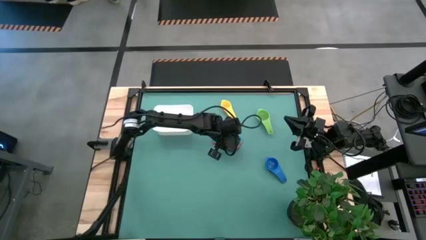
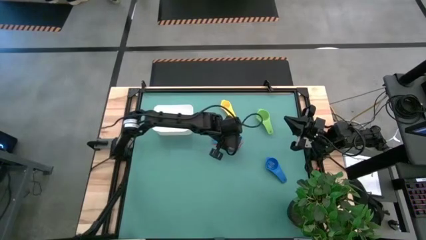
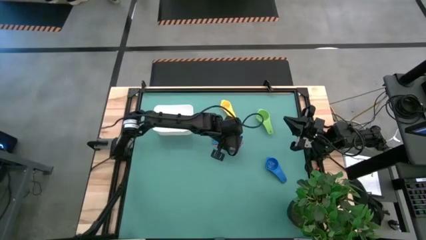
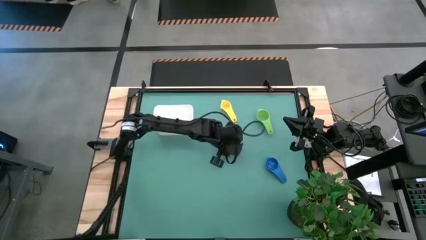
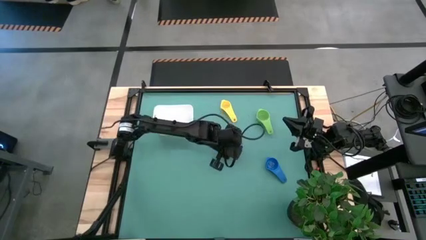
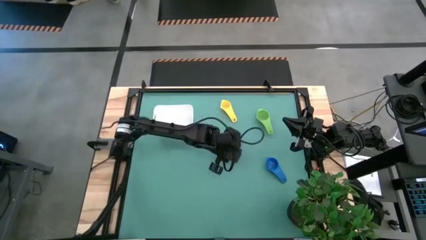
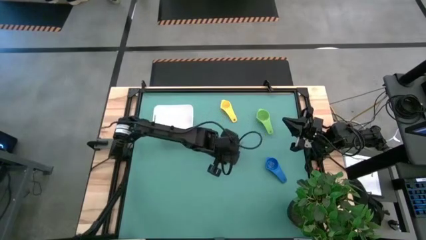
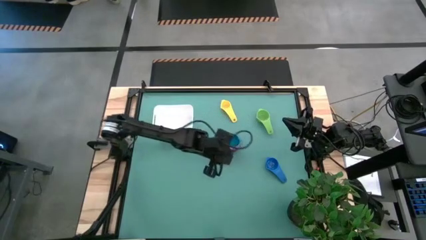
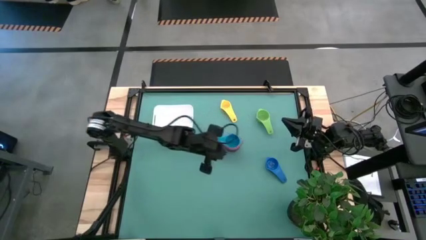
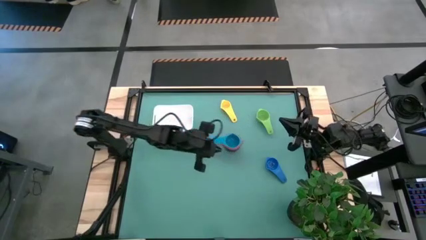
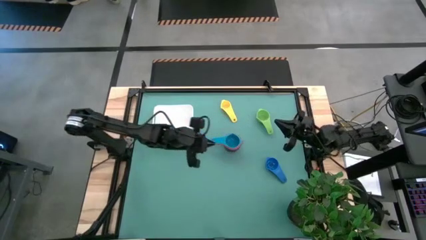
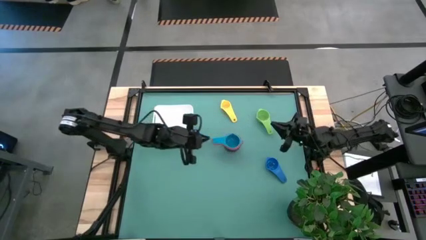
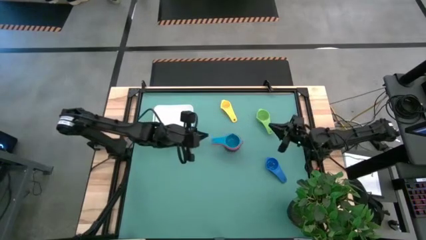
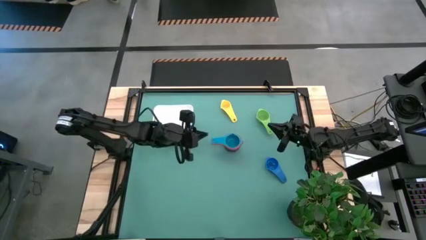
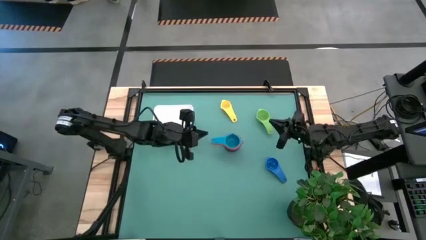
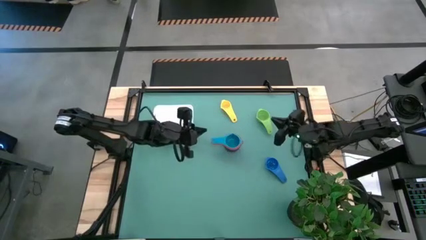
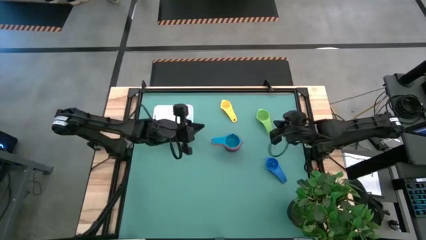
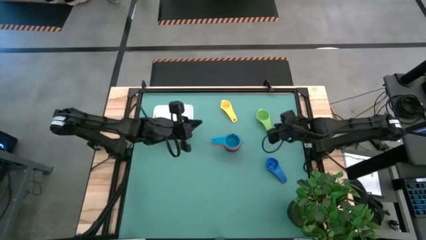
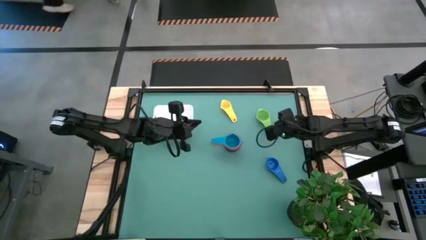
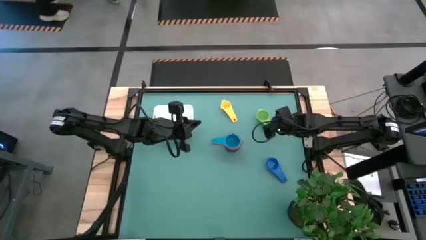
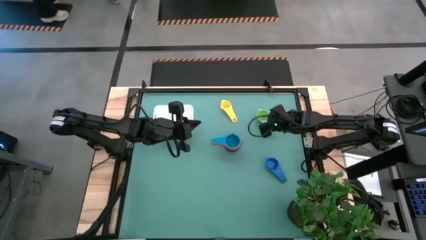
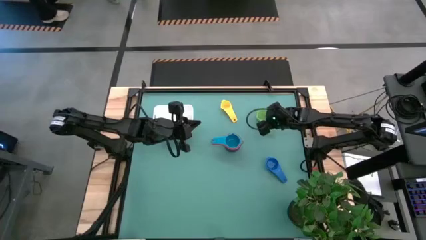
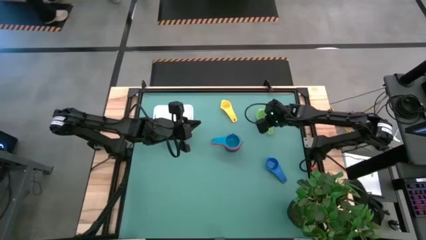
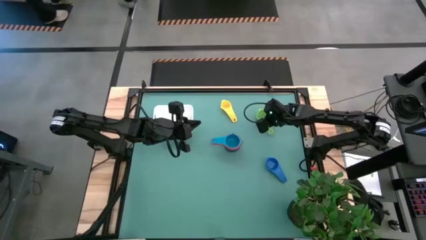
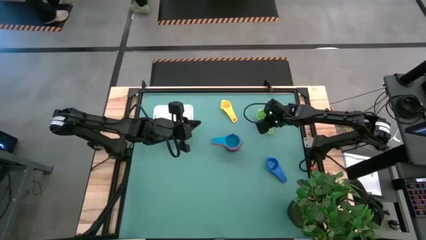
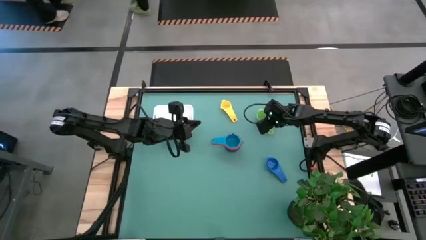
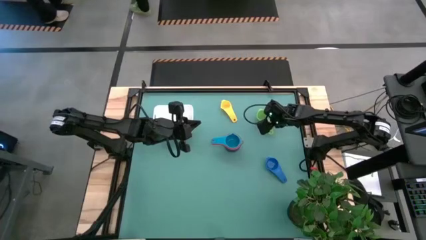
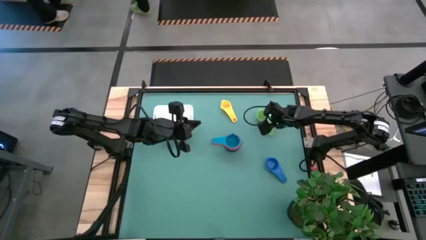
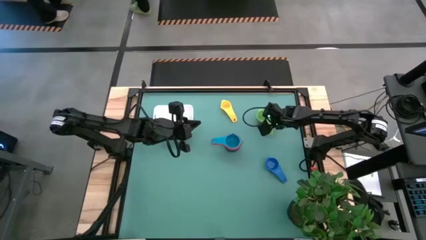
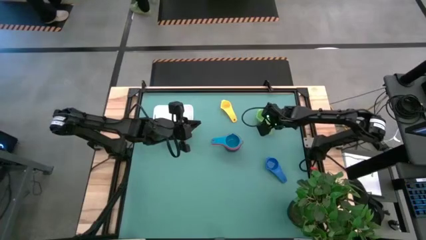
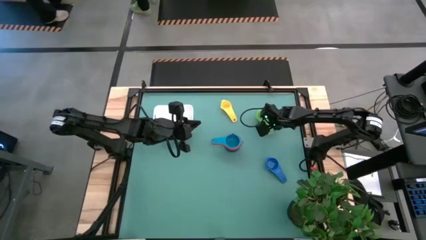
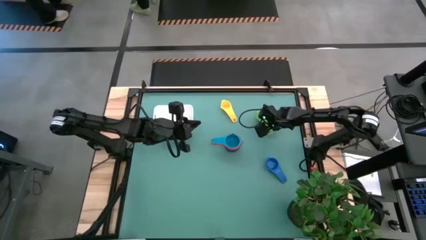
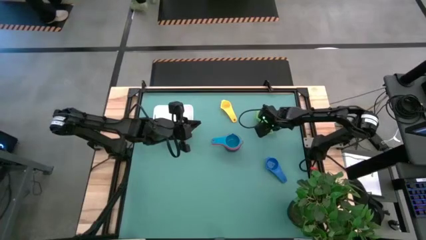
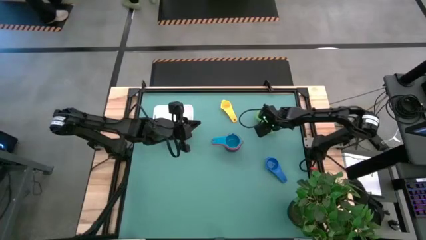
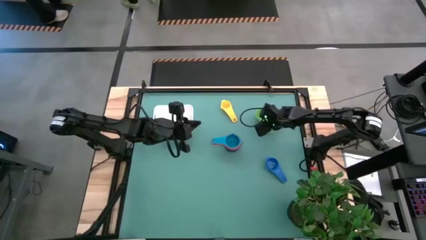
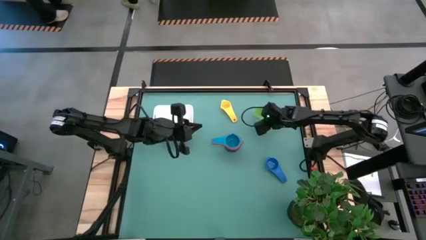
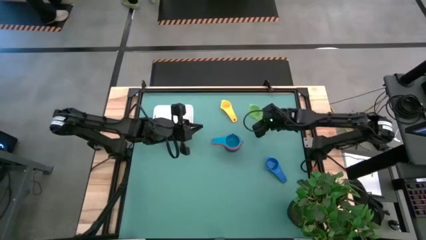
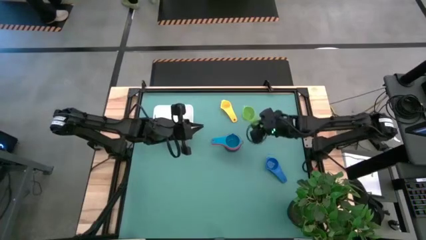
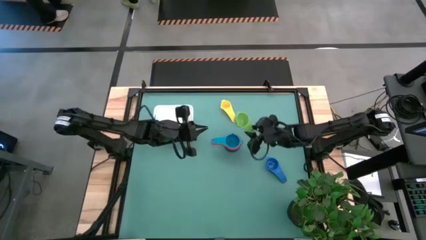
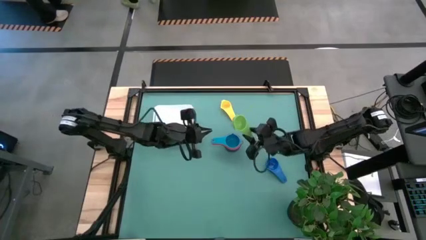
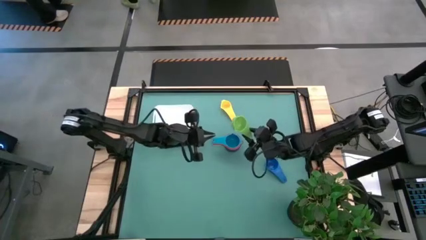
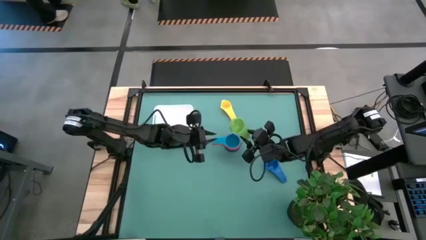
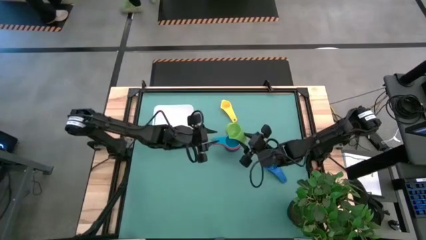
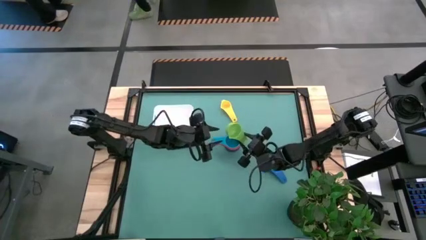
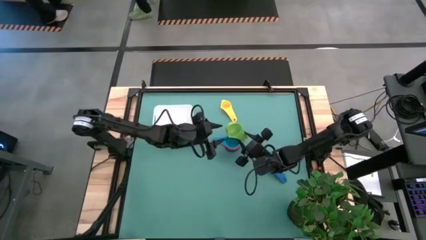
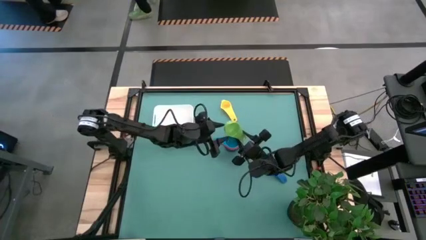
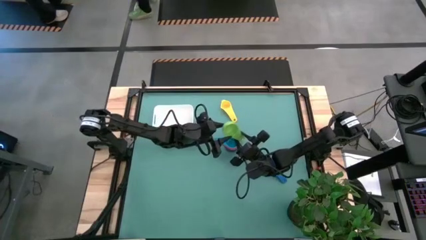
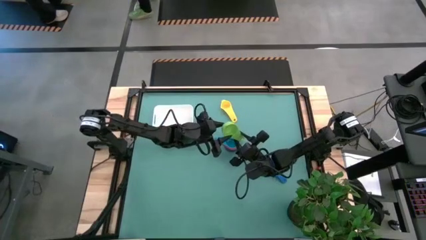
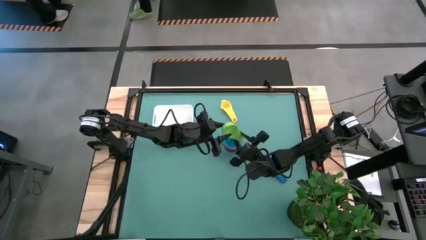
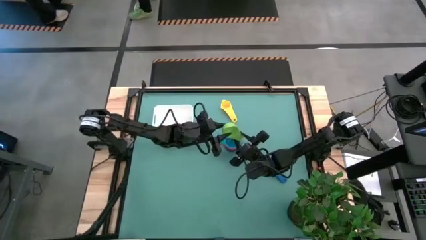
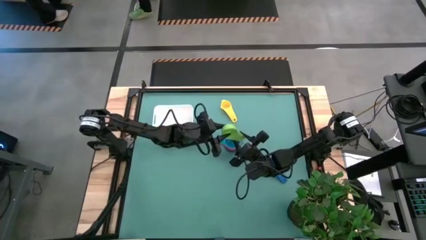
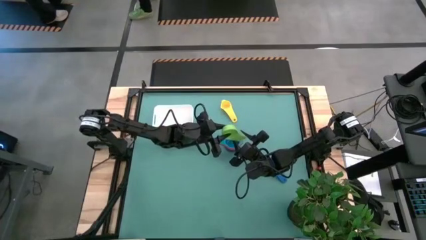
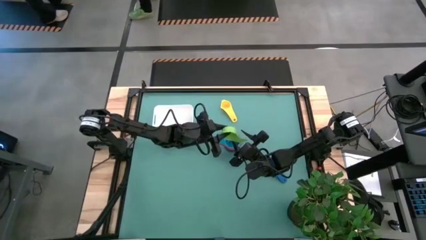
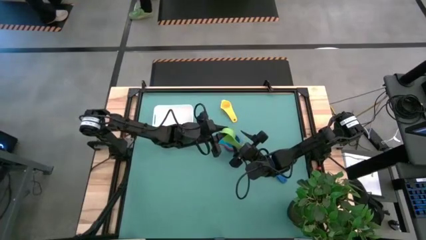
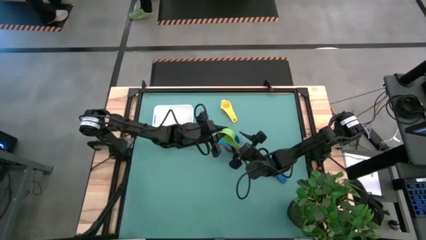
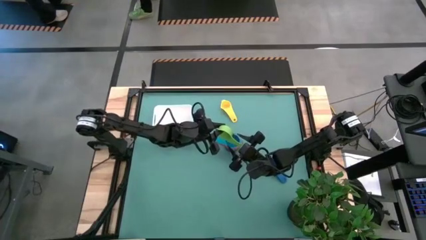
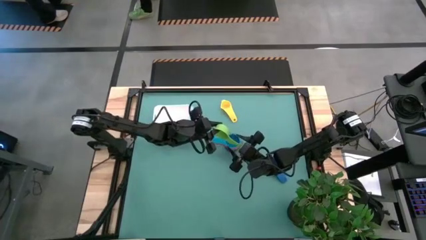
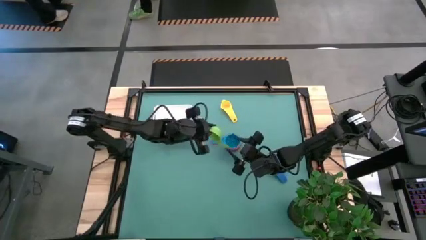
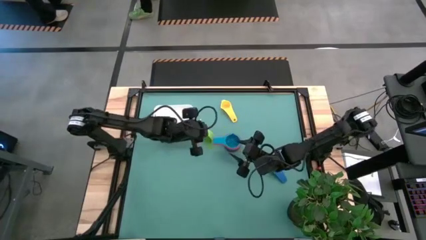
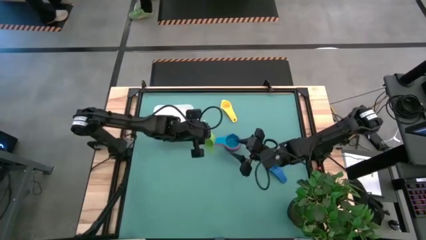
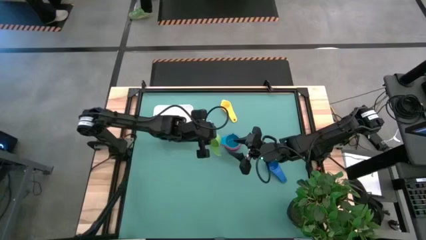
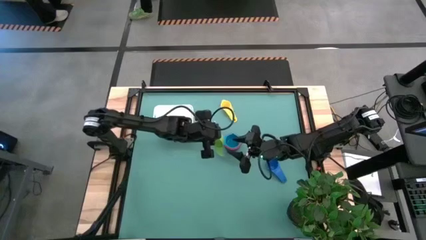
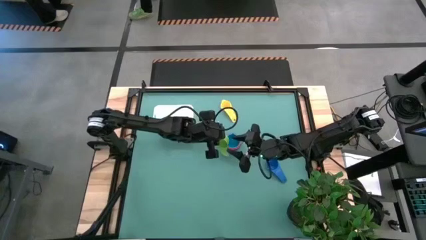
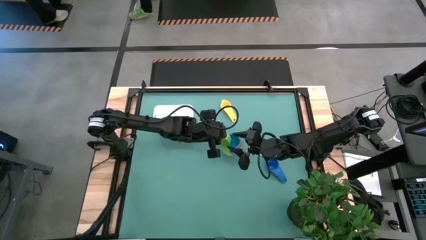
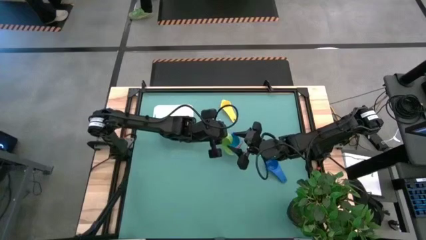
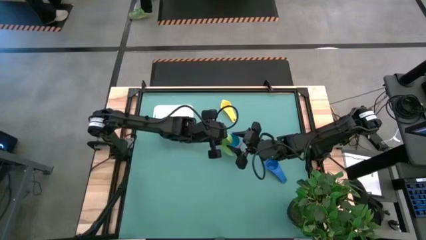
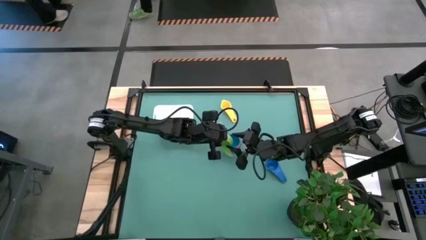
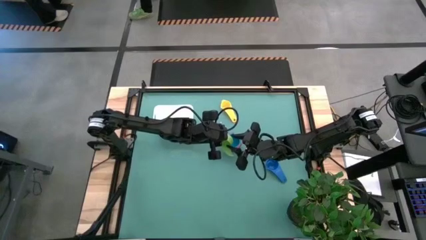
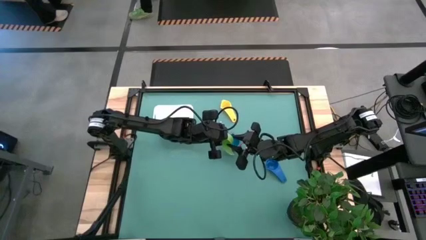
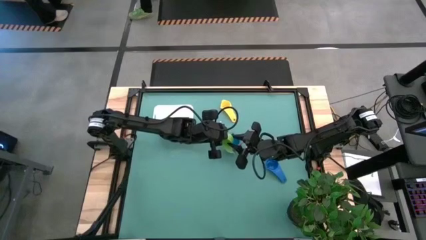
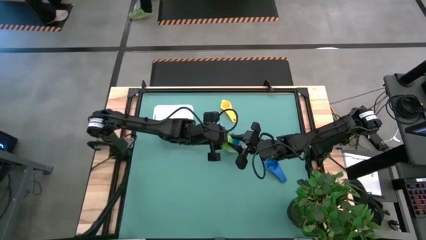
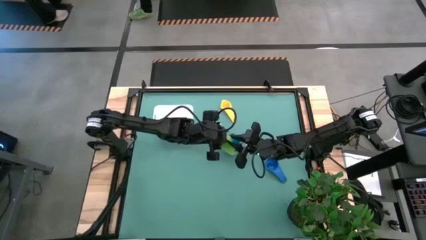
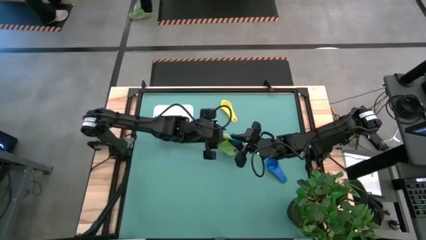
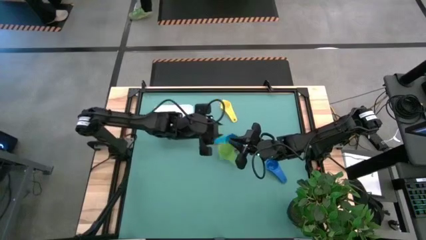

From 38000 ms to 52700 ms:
Task: Nest measuring cups in basket
Stack the green measuring on top of the light blue measuring cup

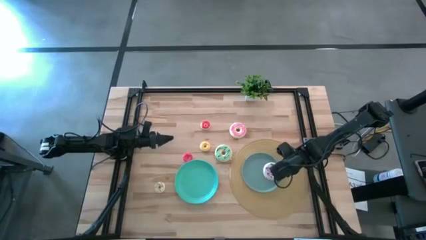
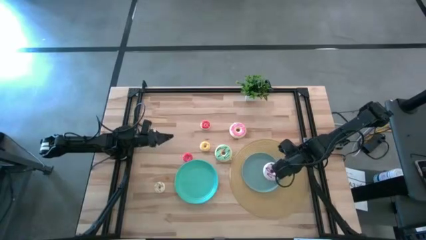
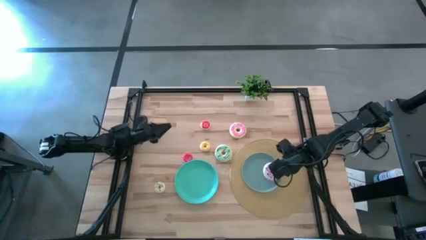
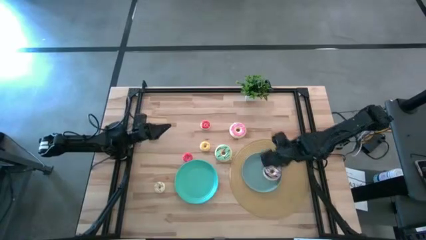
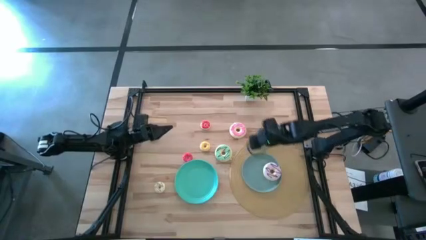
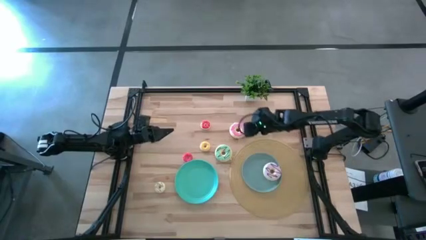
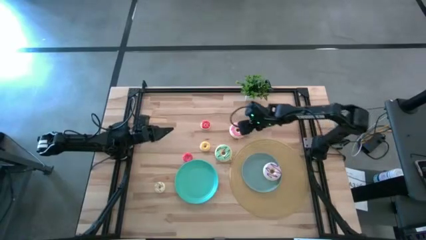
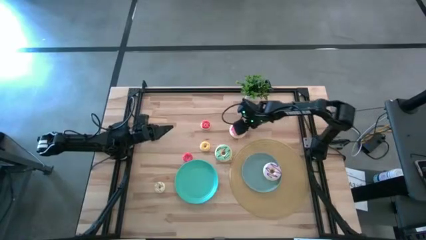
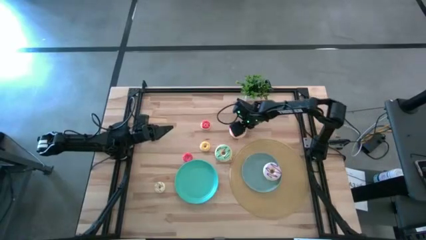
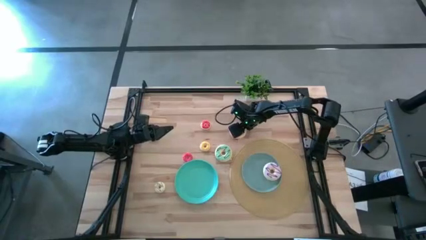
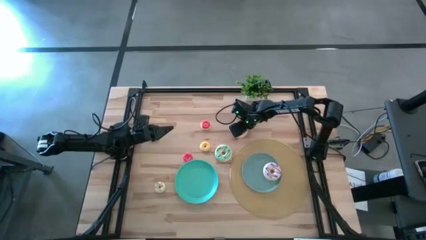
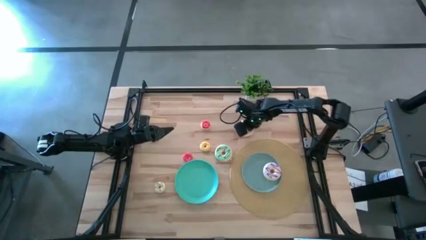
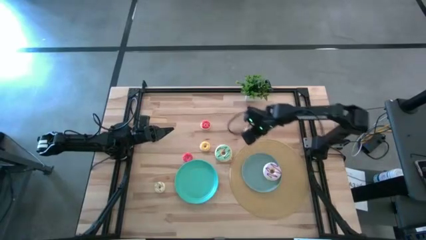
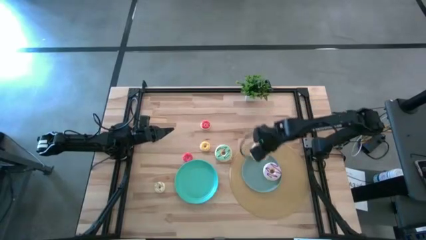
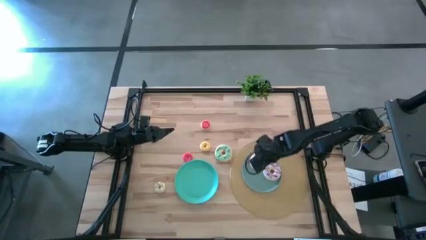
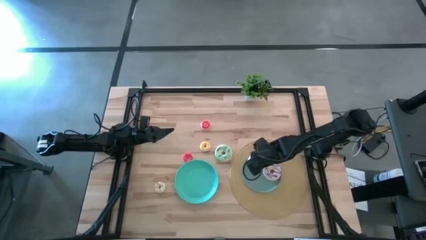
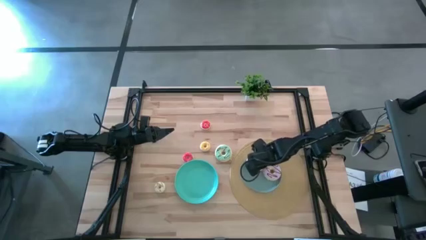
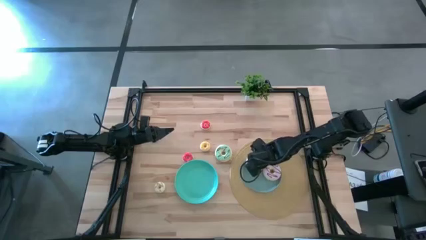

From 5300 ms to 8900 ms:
Task: Pick & Place donuts
Put the large pink donut on the blue plate
